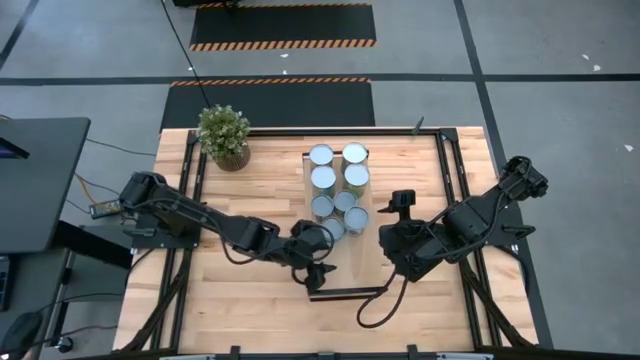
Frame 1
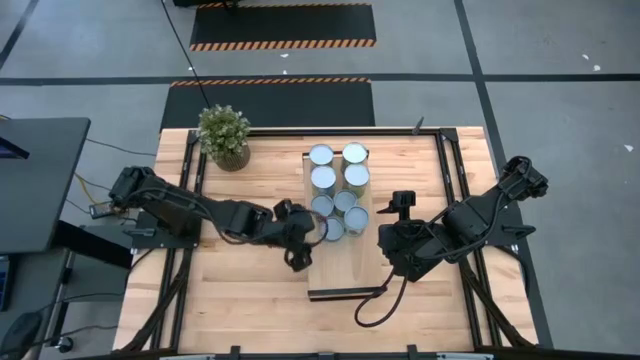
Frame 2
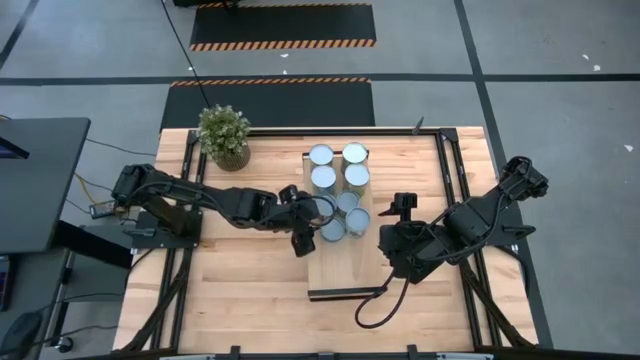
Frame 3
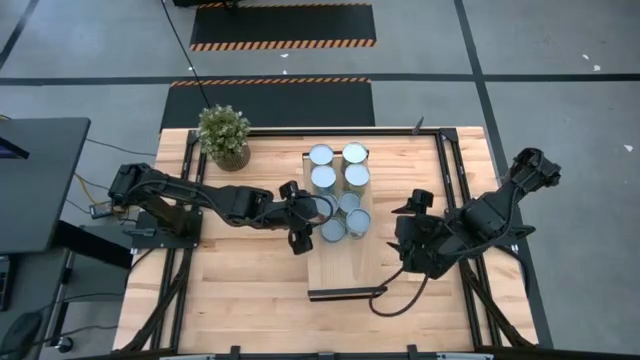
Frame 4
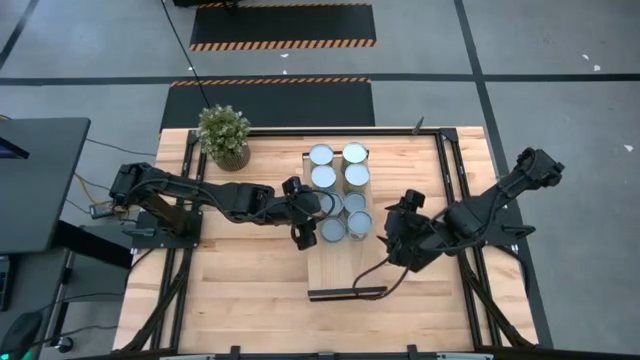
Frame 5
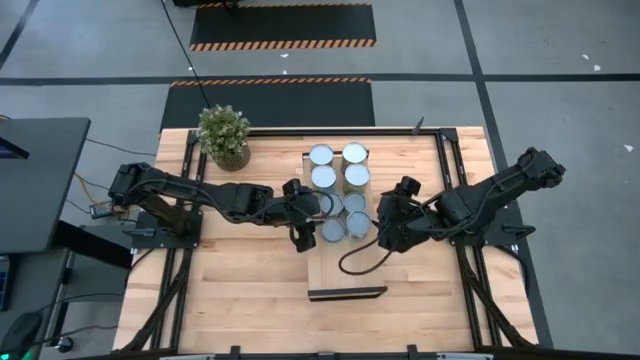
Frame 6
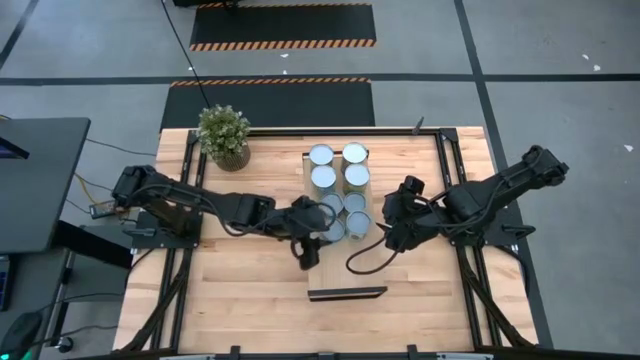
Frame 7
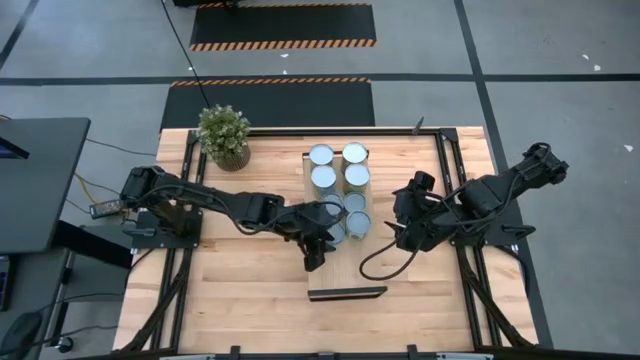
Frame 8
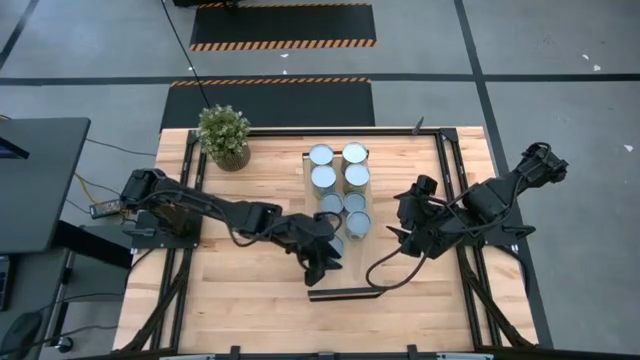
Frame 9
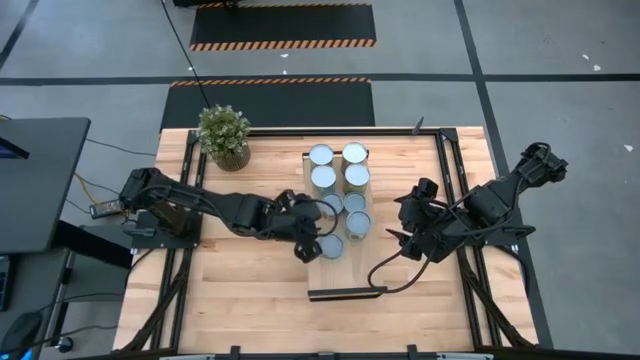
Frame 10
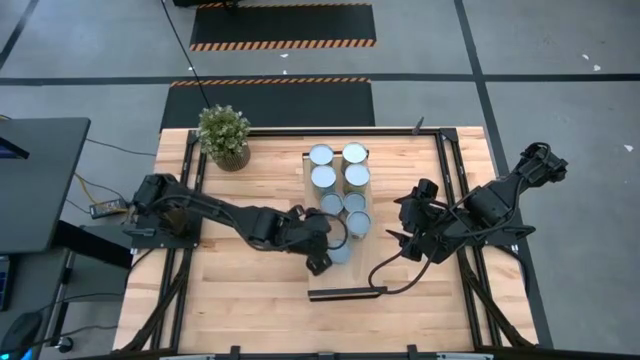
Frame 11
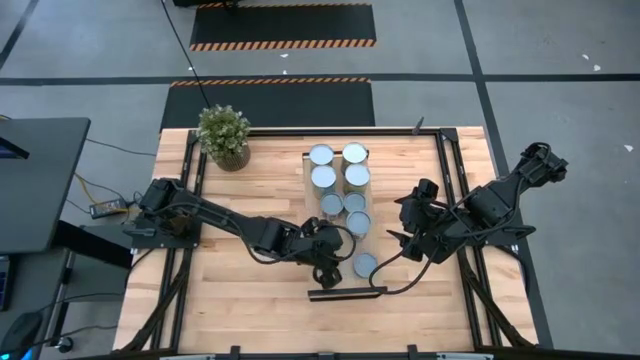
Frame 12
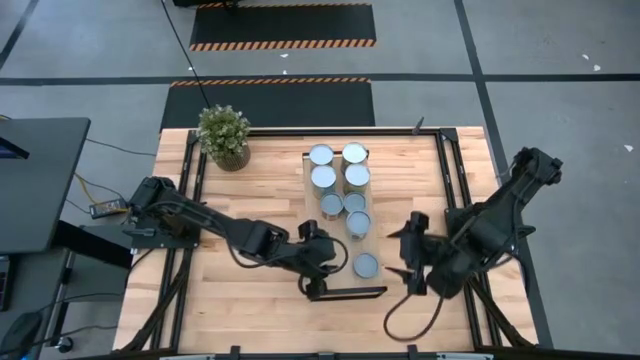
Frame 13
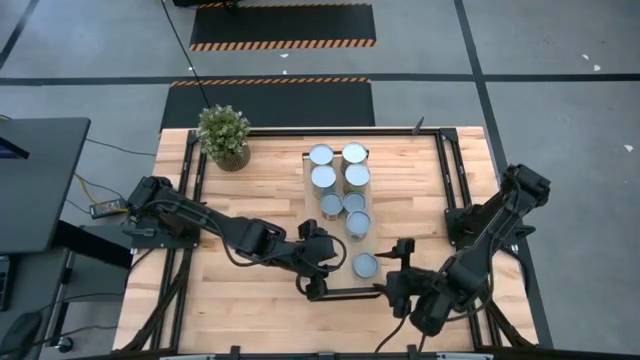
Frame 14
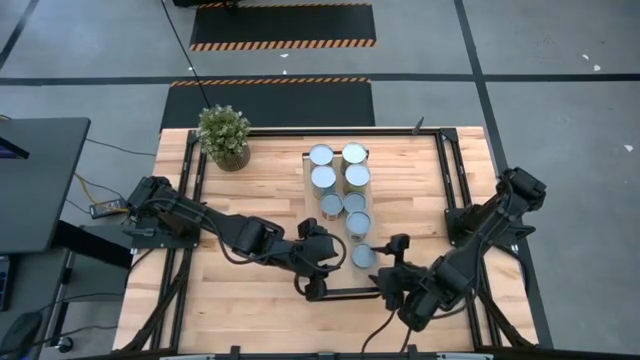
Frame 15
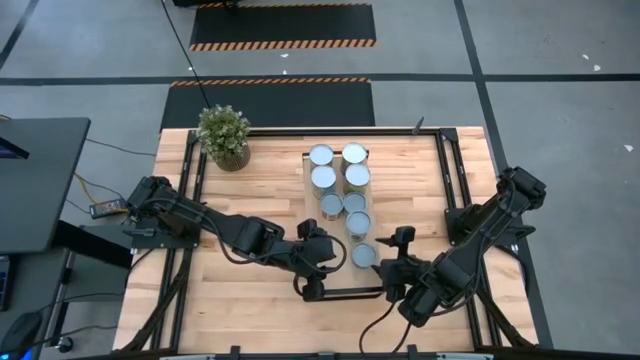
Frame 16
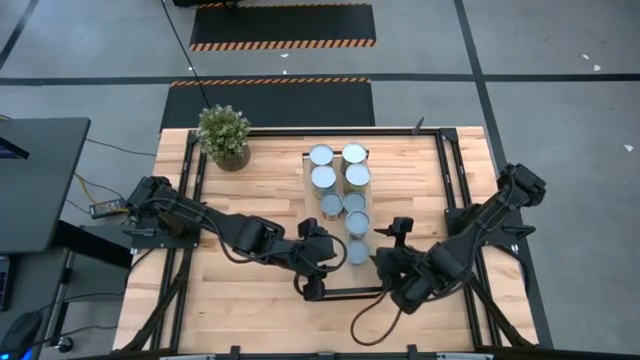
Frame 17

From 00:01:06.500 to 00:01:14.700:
Task: Pick and place cans onto a shelf
Adjust the canned goods on the shelf

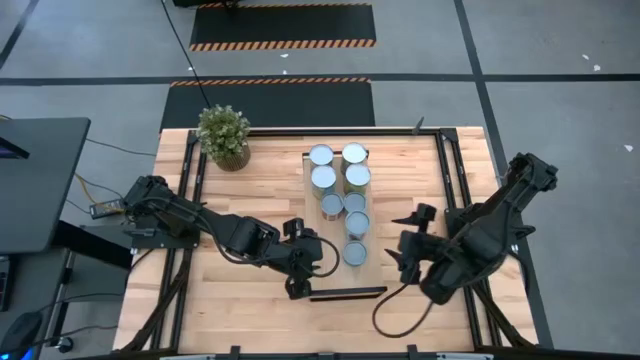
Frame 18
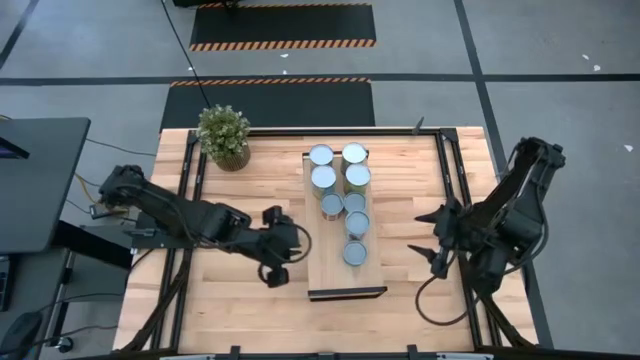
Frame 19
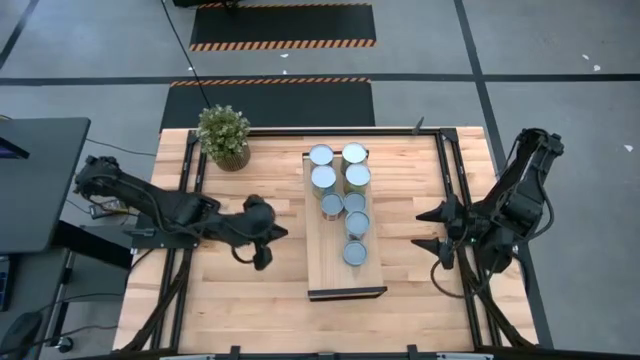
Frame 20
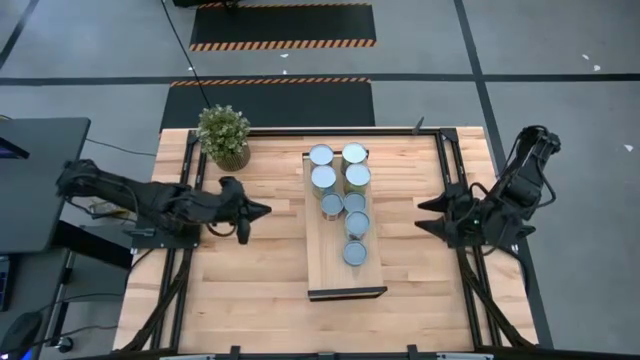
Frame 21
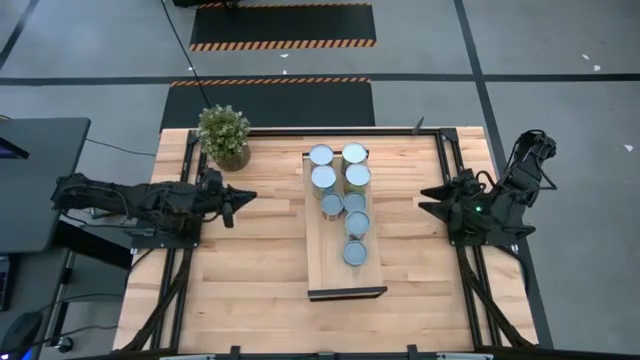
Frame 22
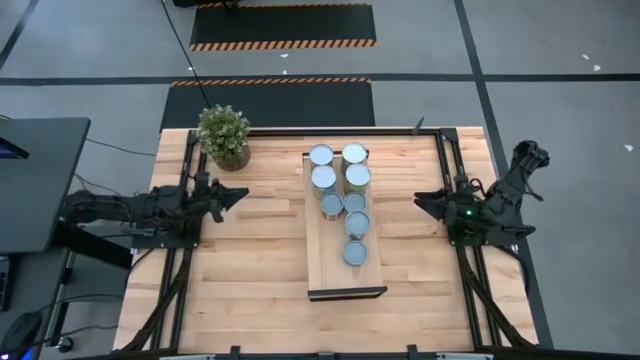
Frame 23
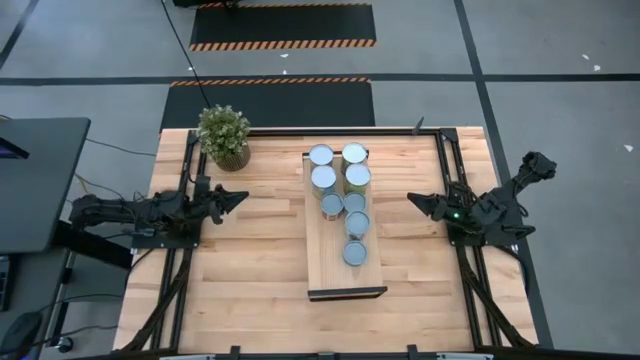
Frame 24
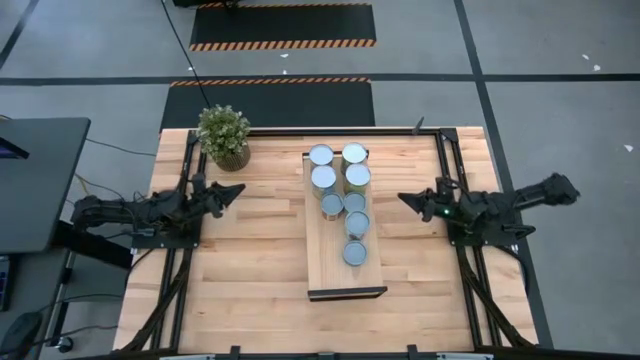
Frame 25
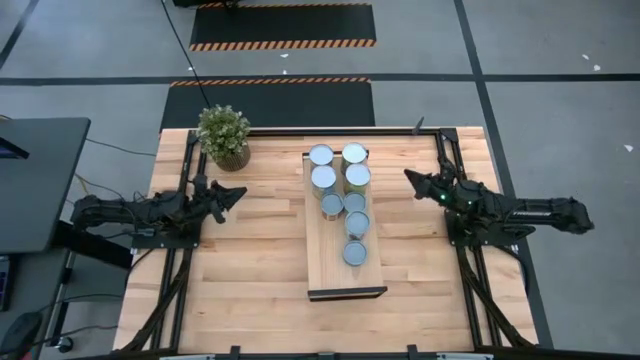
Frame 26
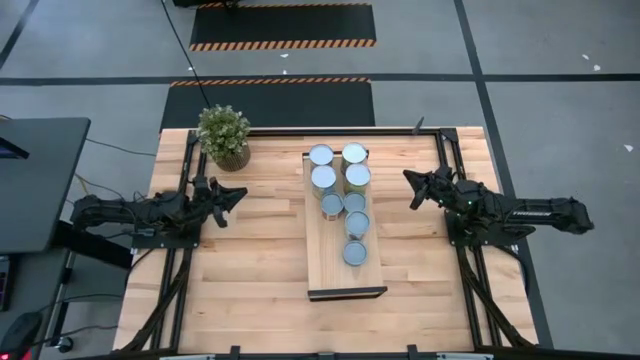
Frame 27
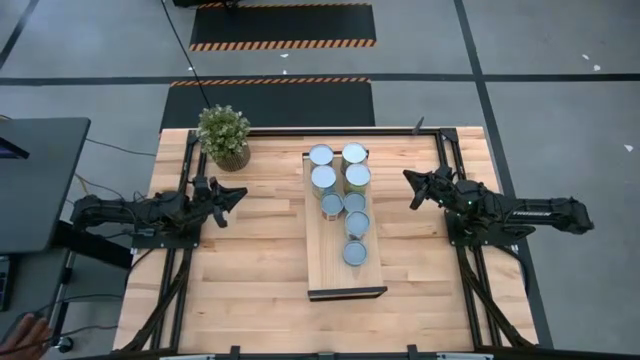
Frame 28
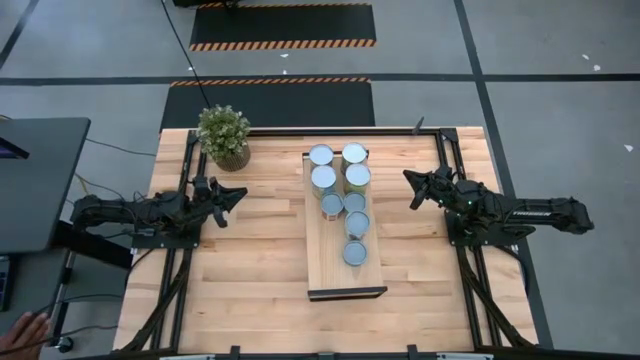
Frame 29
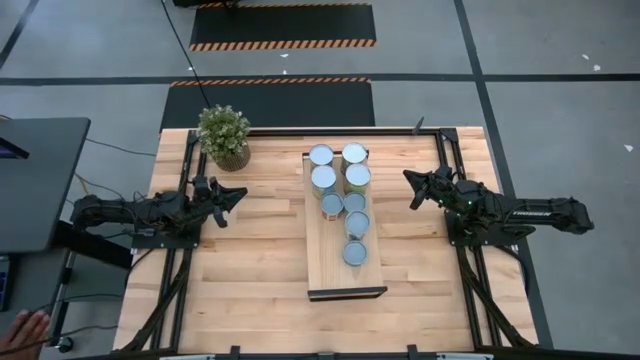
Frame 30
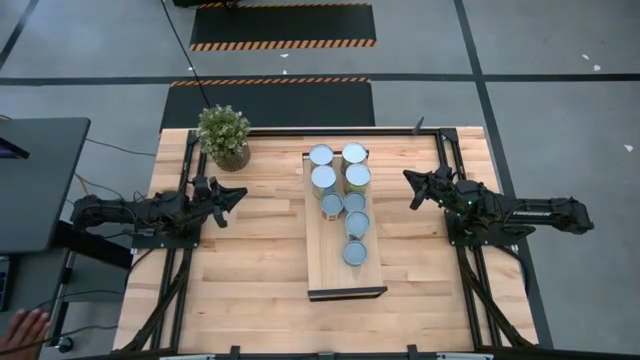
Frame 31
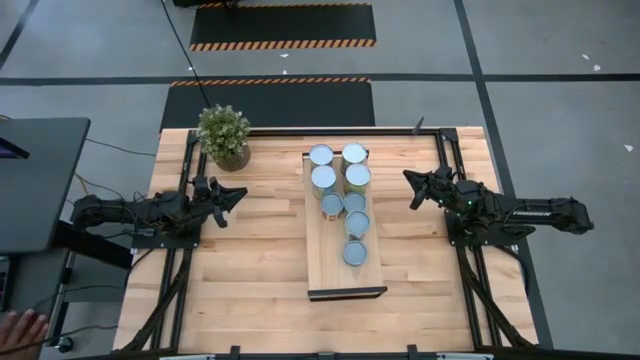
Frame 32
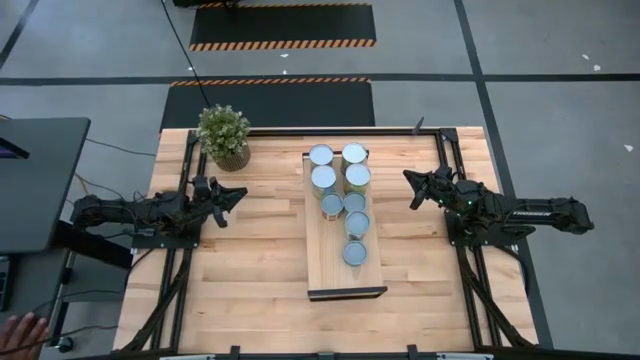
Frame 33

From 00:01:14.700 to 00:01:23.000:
Return to Home Position

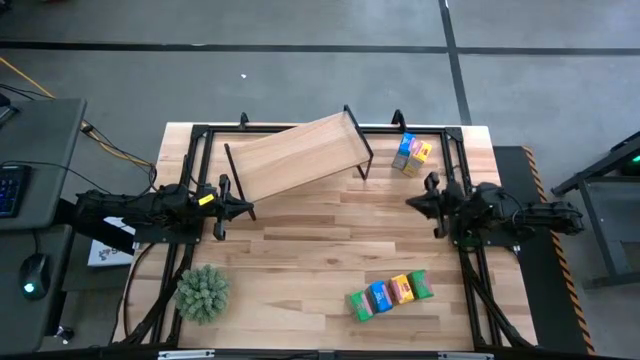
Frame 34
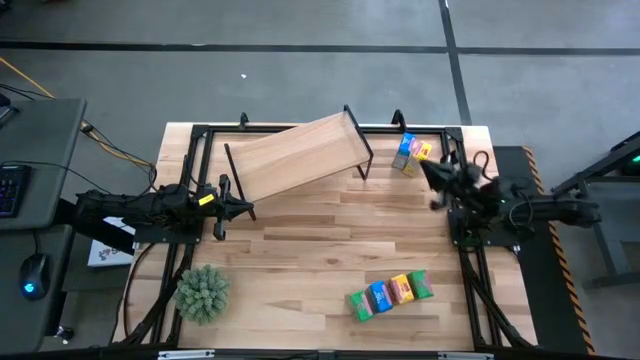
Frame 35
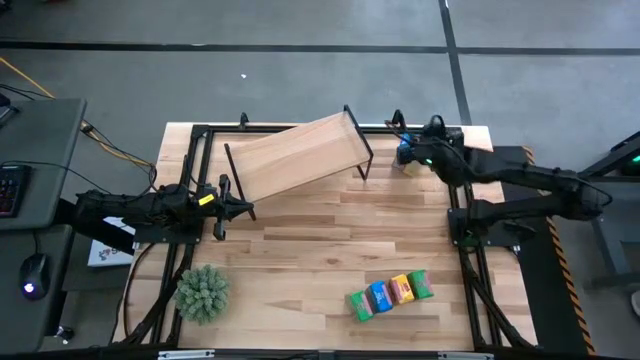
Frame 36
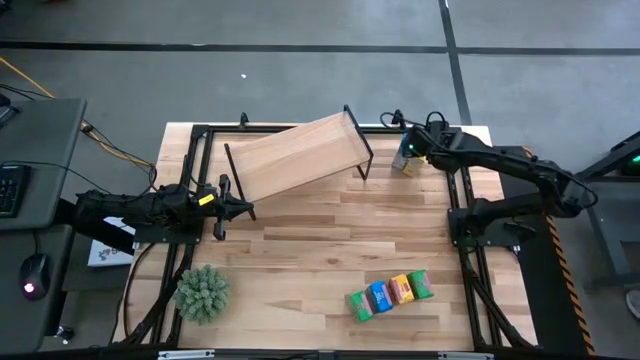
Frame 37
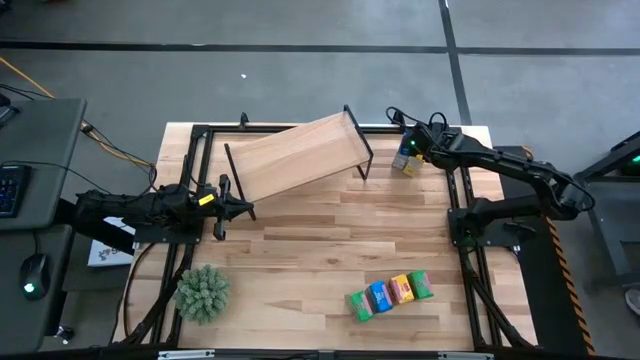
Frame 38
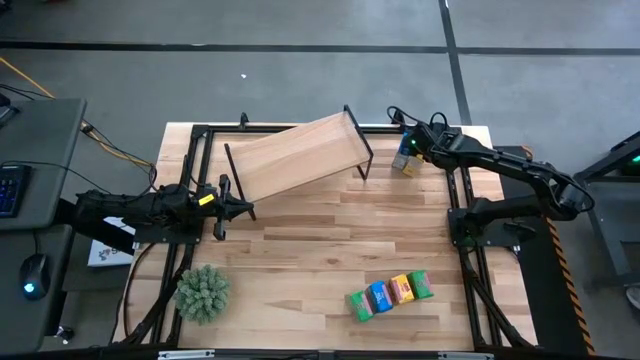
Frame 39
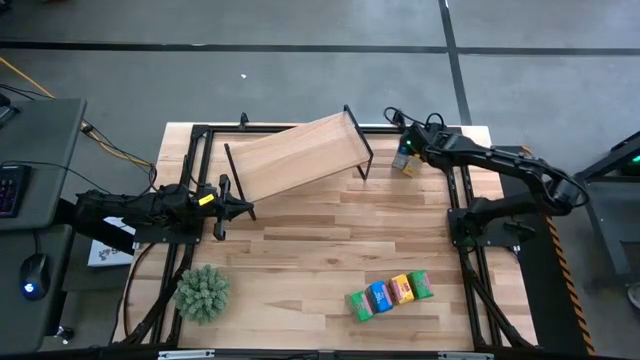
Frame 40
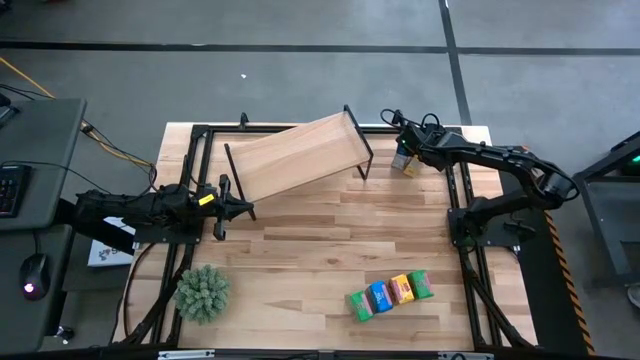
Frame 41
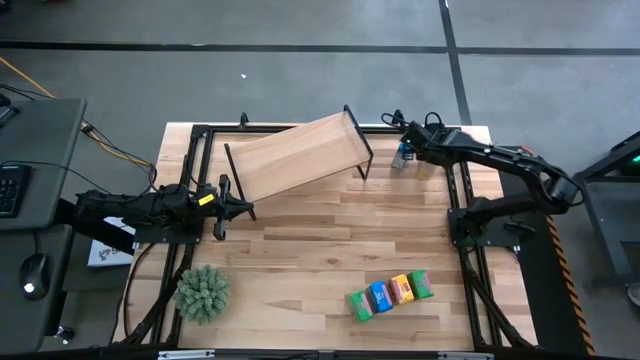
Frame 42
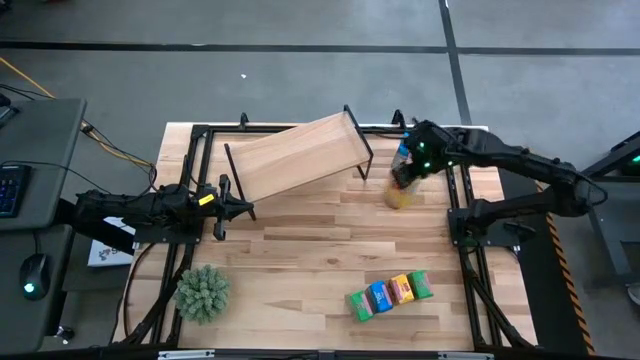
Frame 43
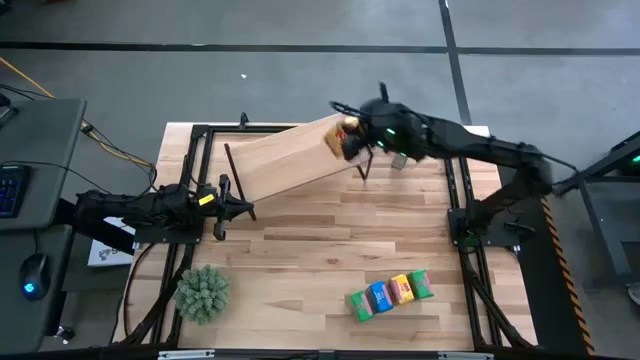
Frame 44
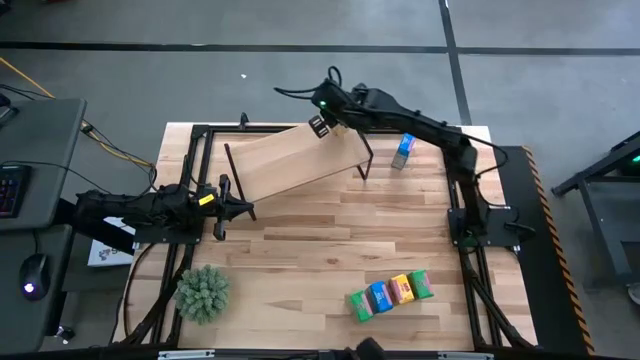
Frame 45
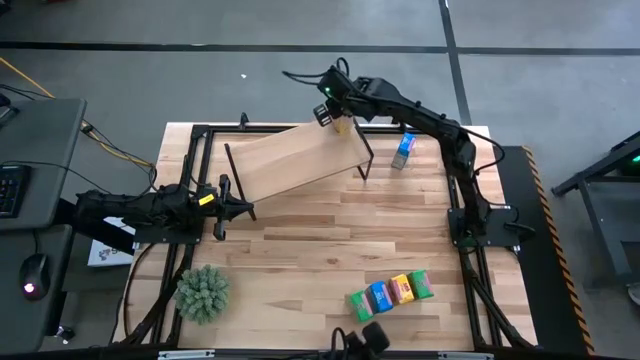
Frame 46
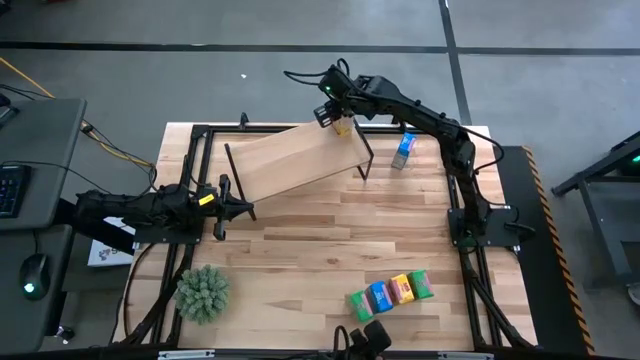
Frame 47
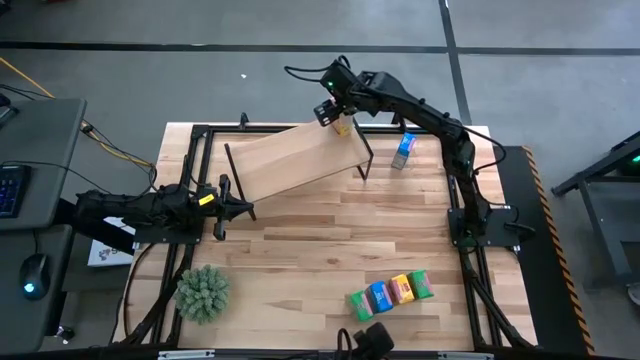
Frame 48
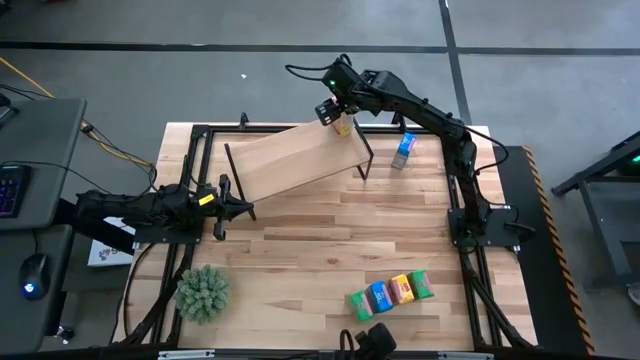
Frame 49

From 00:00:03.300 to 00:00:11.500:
Task: Stack cereal on shelf
Put the top yellow cereal box on the shelf
